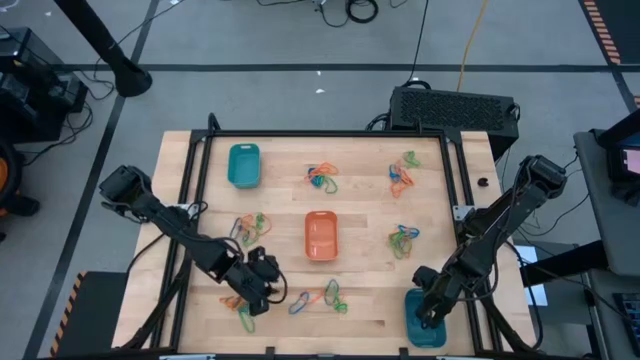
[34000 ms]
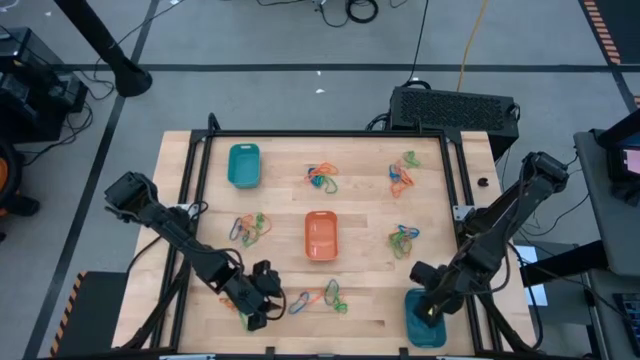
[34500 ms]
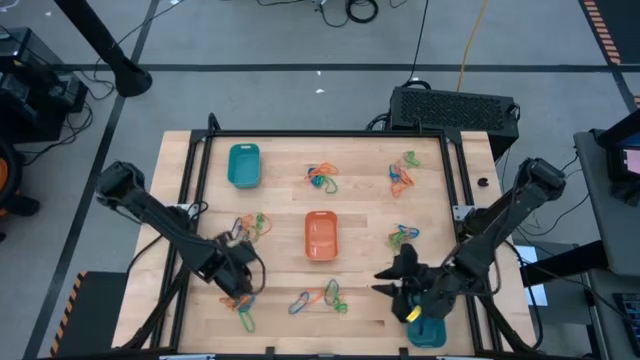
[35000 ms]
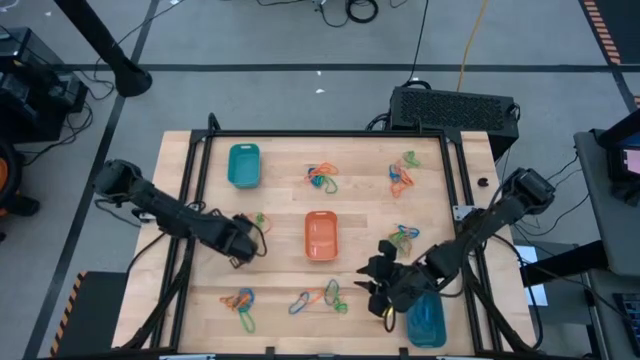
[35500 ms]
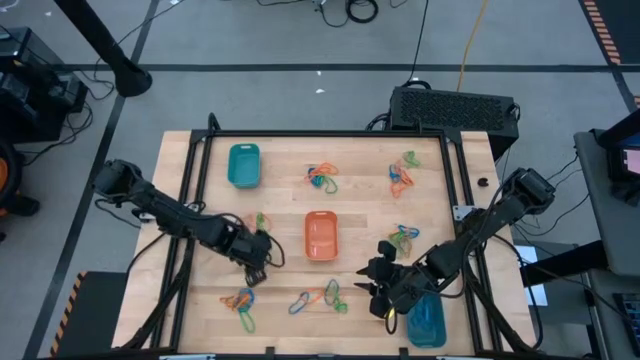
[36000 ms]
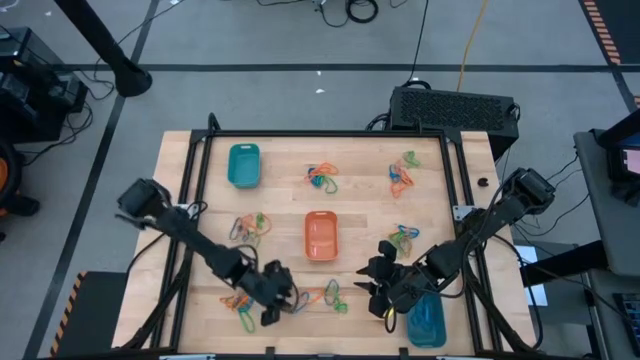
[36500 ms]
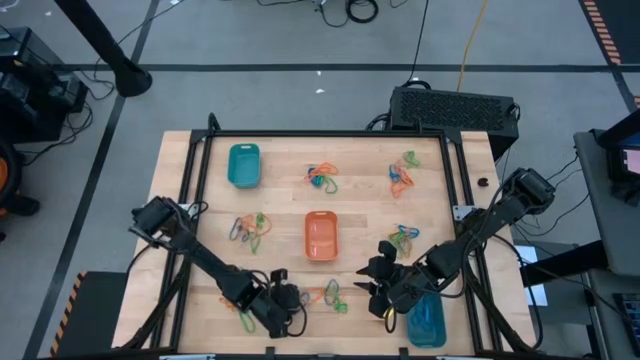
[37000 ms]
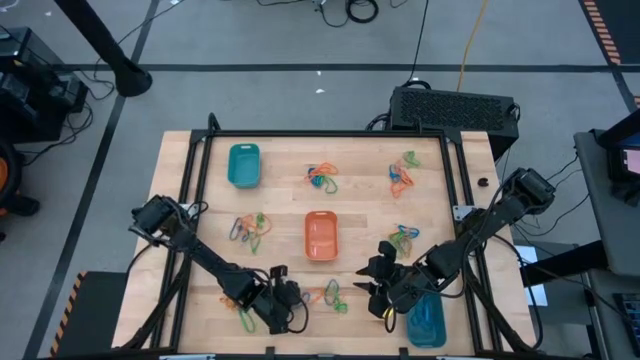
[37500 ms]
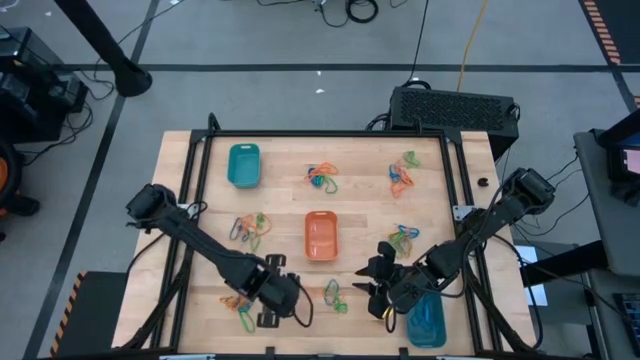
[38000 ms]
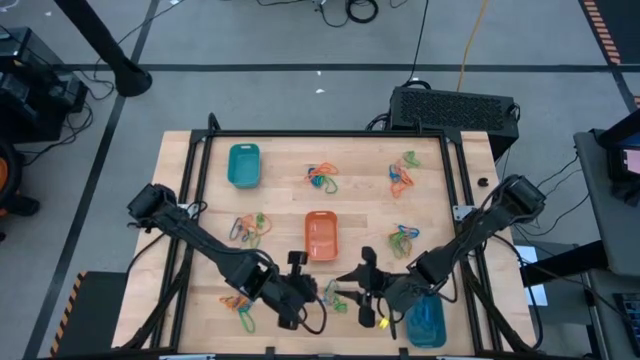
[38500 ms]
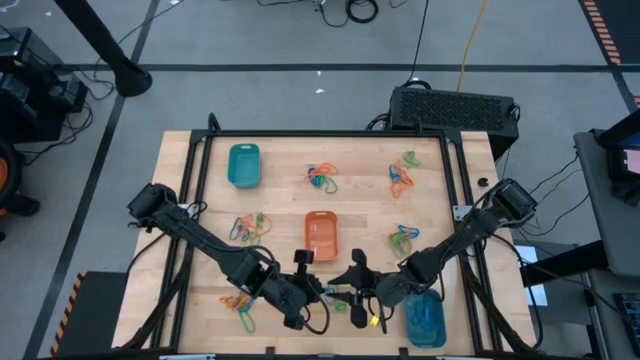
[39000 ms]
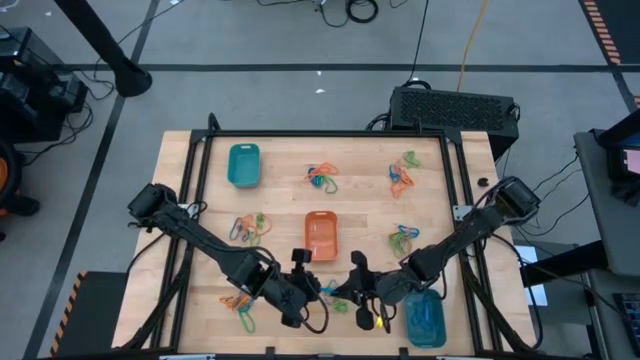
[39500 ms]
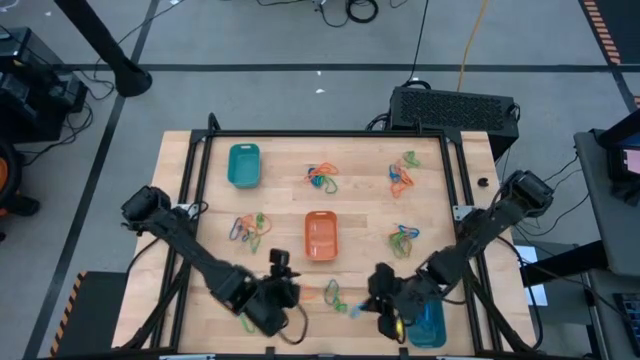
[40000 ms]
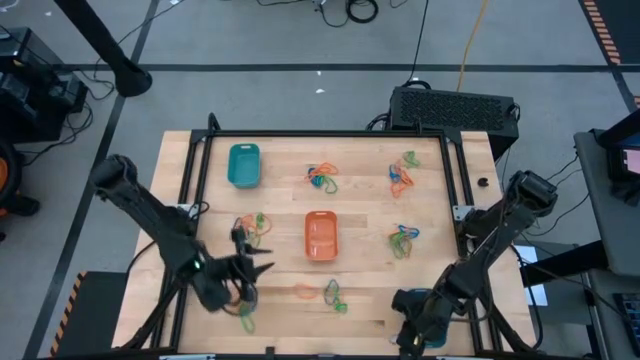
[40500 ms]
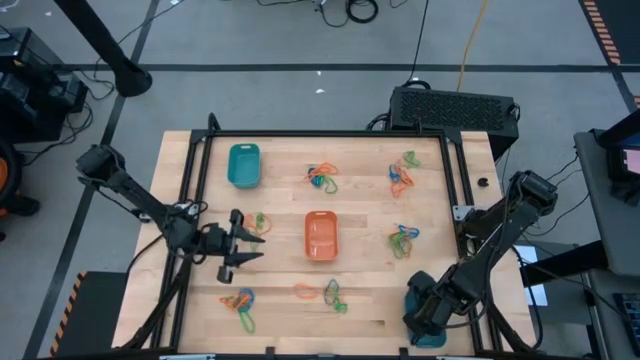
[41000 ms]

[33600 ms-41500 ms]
Task: Sort rubber bands into baskets
Put the blue rubber band into the blue bin

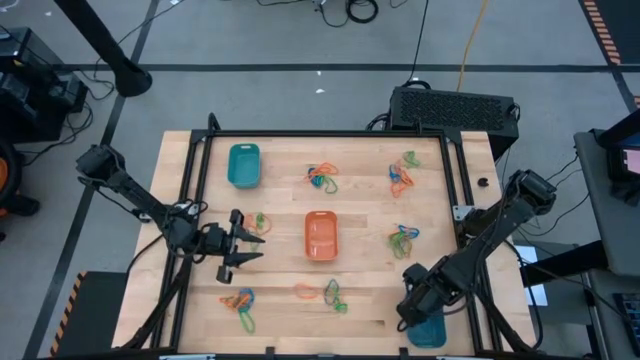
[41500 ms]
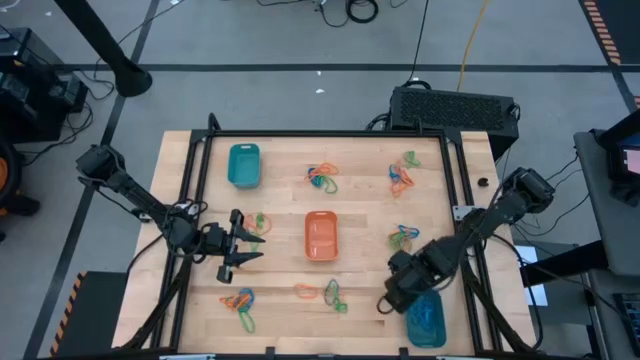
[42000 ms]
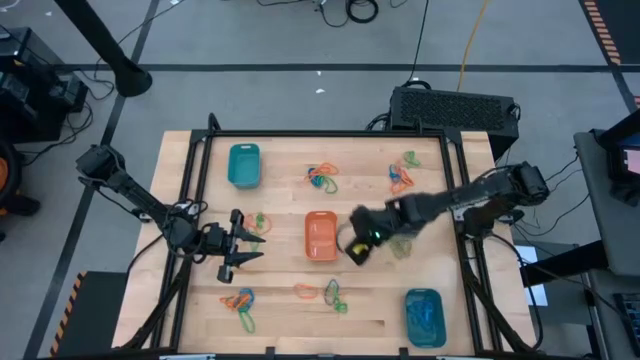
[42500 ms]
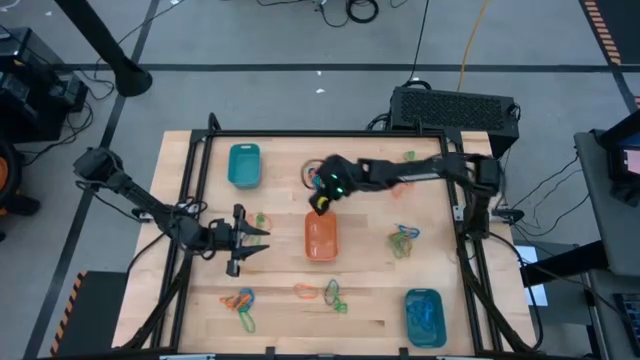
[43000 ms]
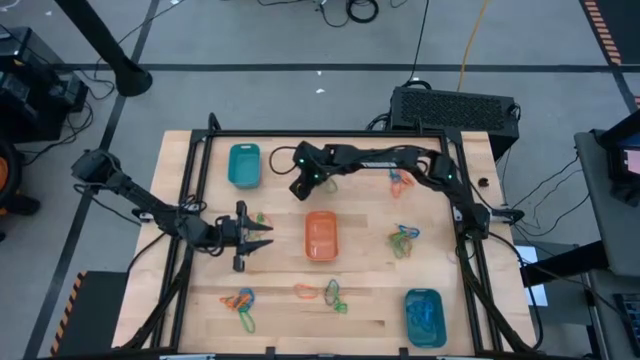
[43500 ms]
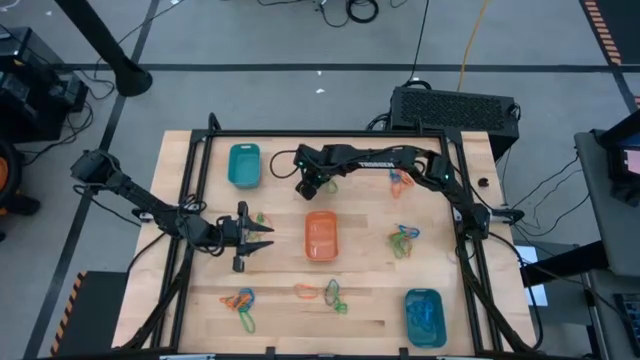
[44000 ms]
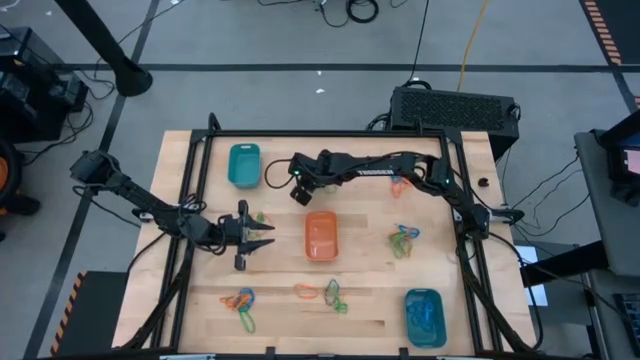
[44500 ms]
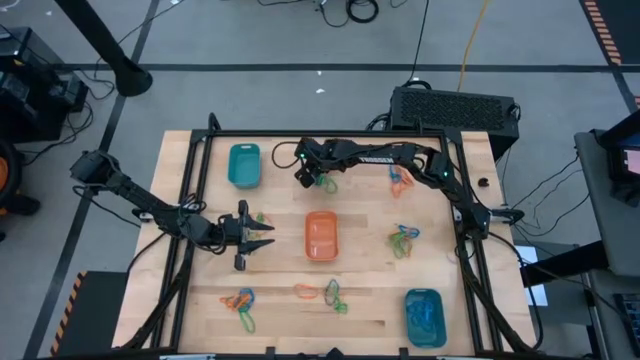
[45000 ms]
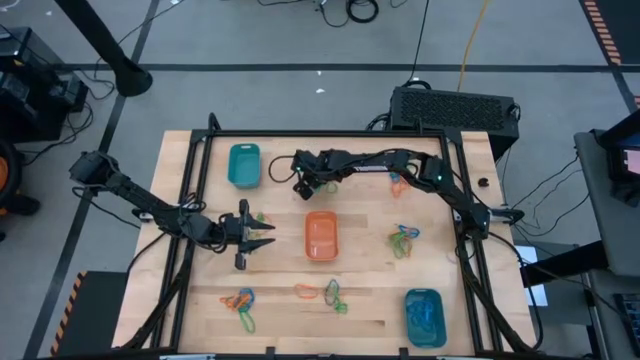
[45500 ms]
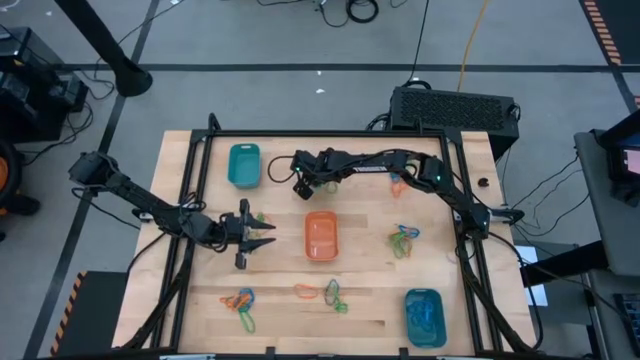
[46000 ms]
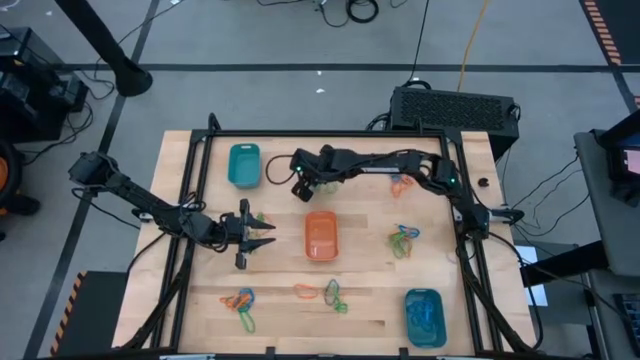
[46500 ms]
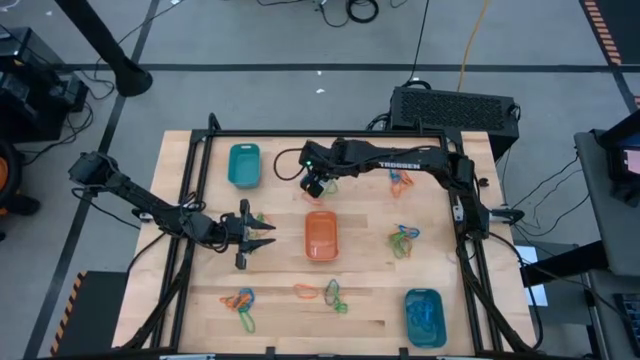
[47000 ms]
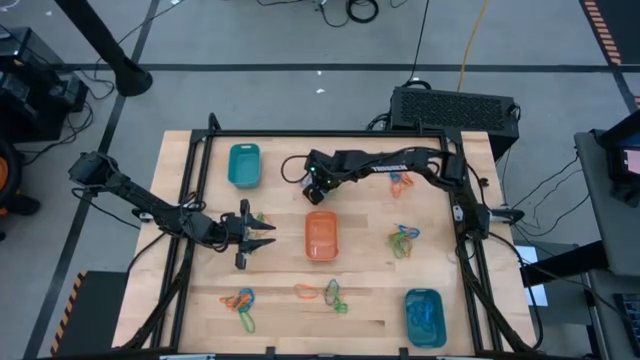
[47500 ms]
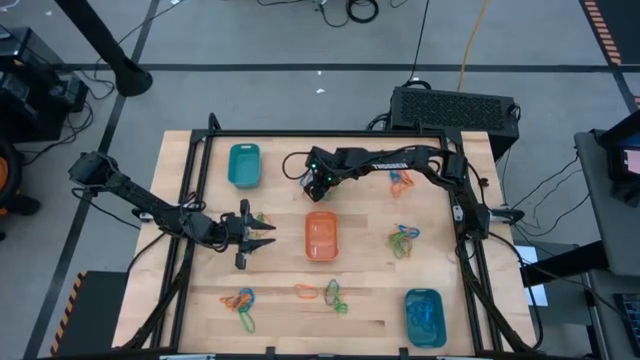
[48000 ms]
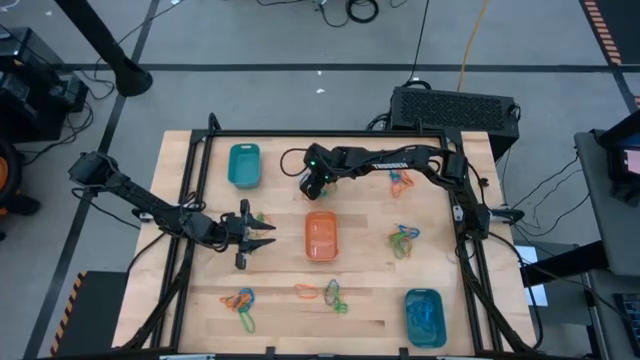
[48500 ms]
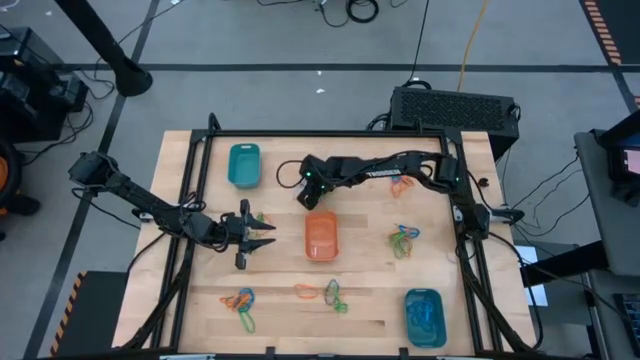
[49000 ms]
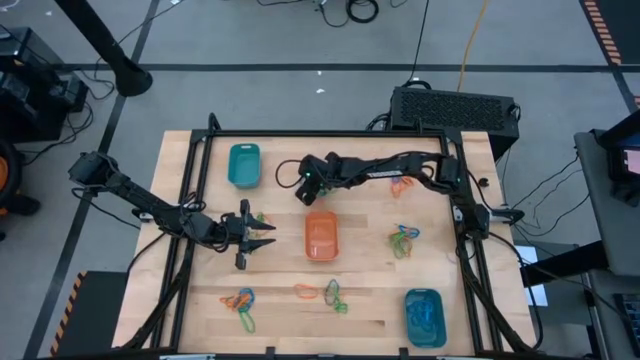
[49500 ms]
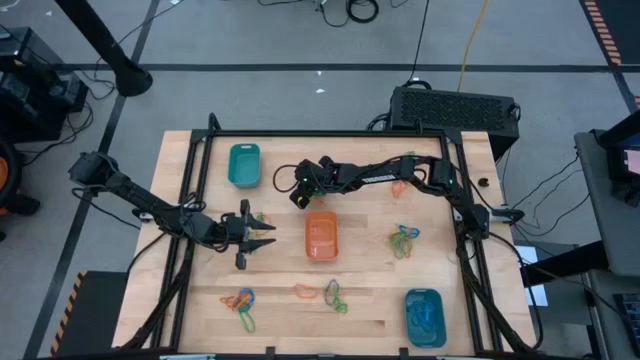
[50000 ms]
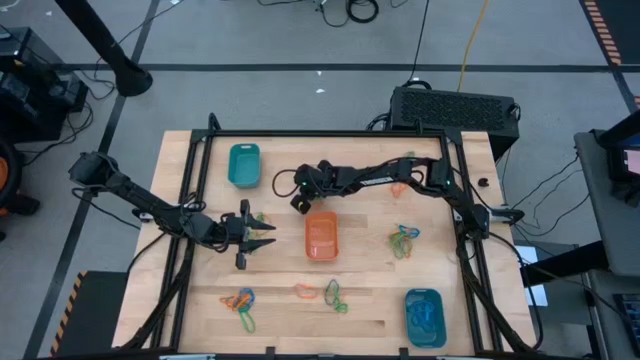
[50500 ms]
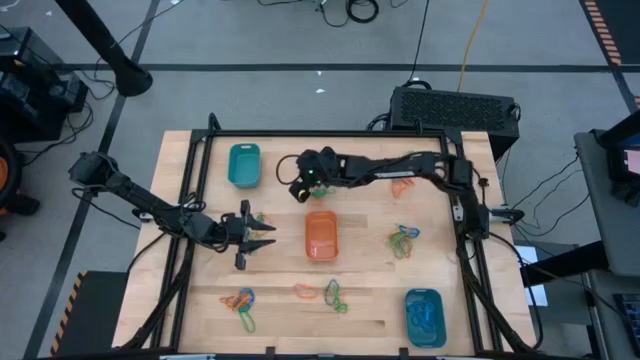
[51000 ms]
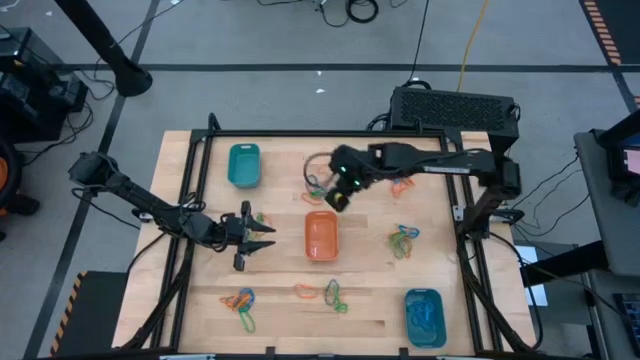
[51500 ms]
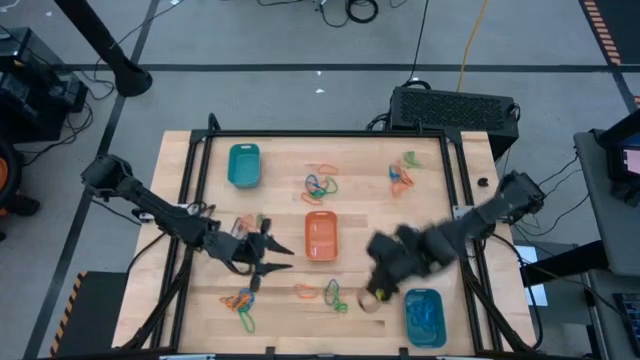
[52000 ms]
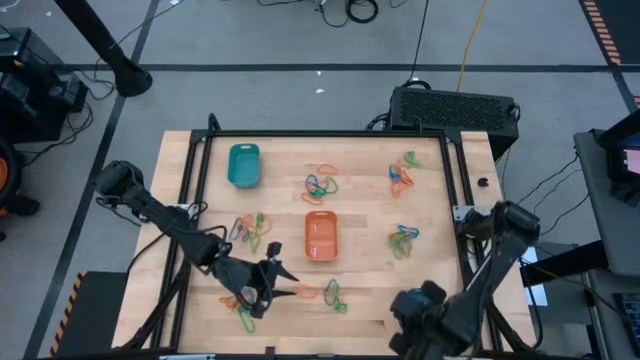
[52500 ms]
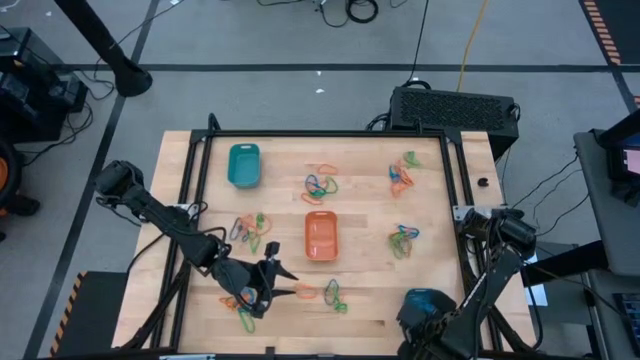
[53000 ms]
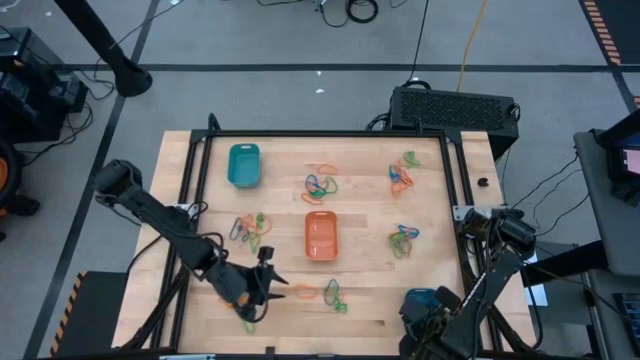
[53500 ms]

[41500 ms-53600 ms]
Put the blue rubber band into the blue bin

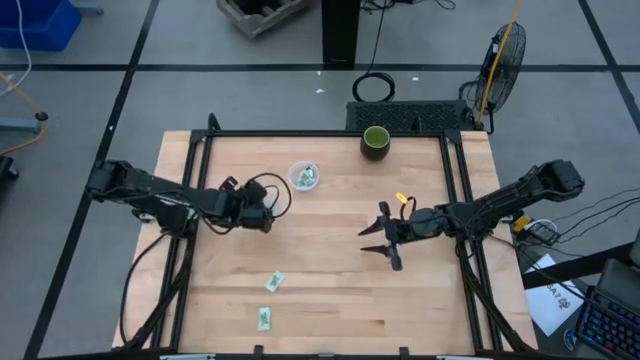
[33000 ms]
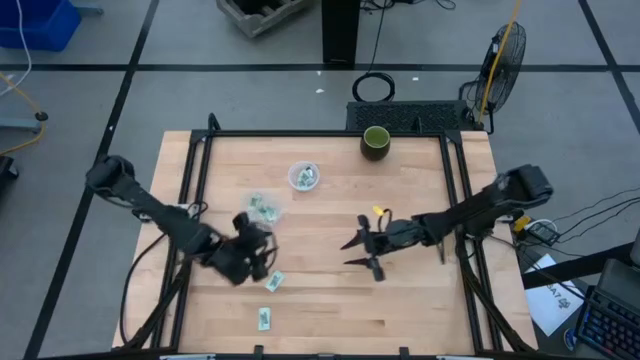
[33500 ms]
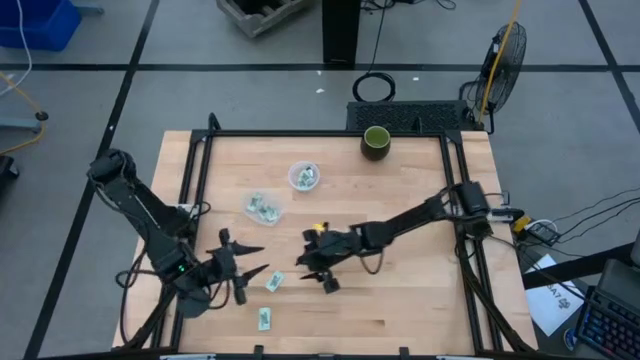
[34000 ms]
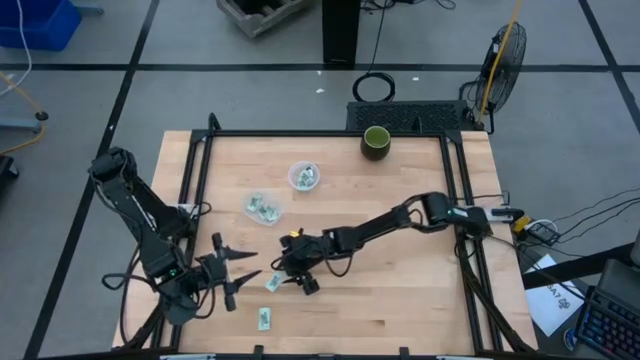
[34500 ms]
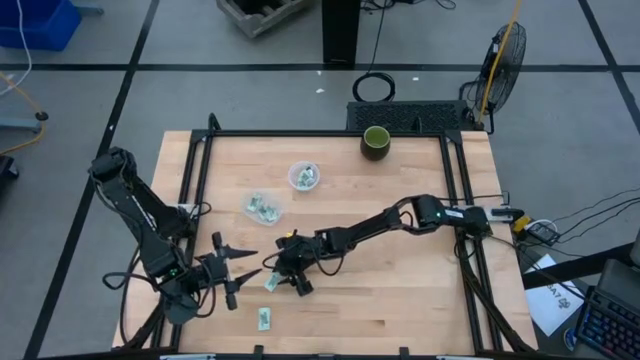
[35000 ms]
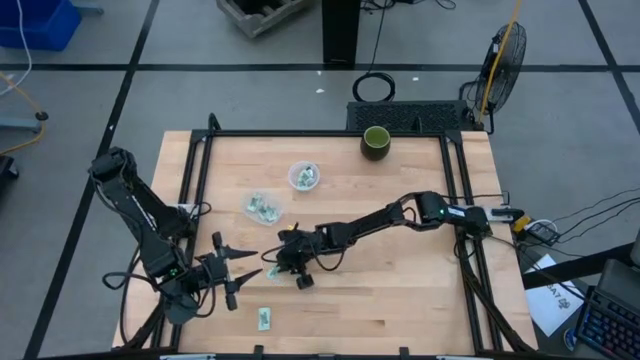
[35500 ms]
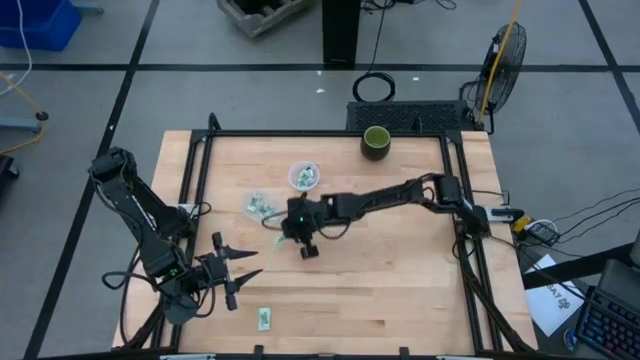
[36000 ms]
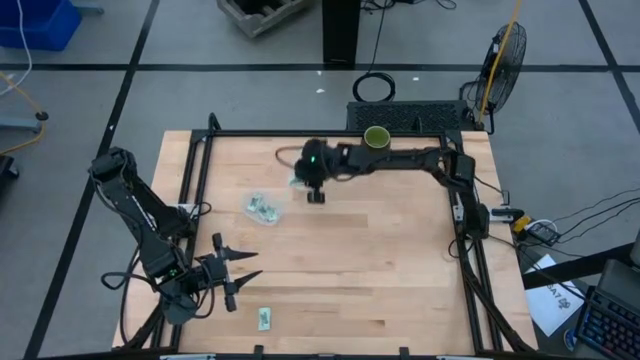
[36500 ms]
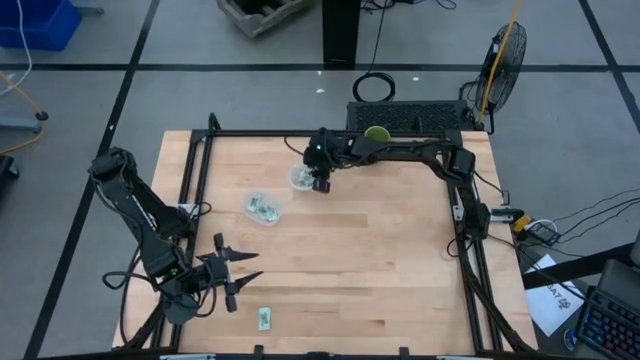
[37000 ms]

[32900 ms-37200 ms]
Task: Pick and place Stevia / Truvia into bins
Put the stevia packet into the top container
